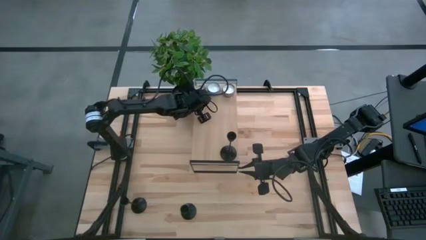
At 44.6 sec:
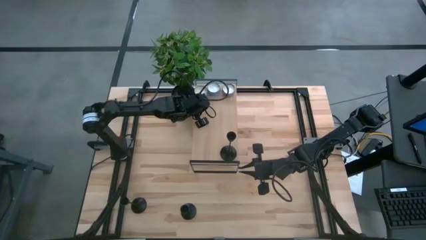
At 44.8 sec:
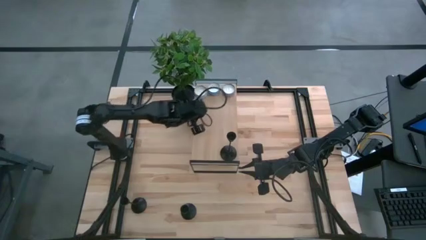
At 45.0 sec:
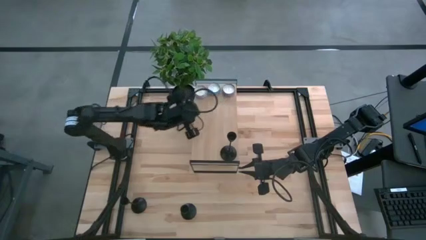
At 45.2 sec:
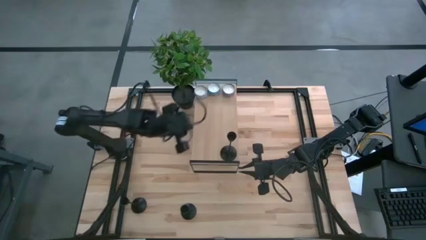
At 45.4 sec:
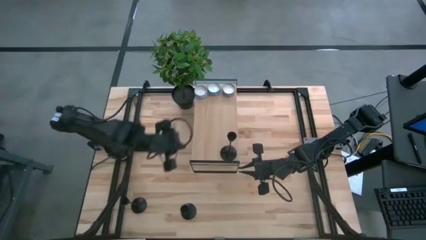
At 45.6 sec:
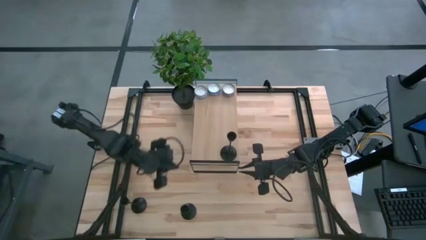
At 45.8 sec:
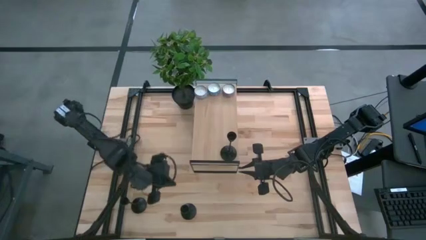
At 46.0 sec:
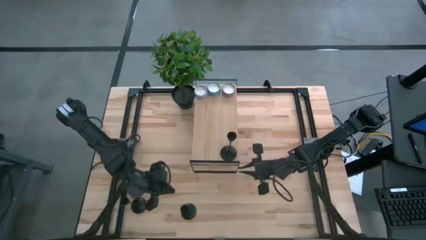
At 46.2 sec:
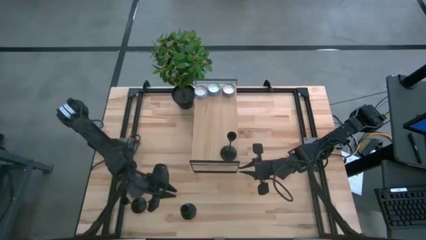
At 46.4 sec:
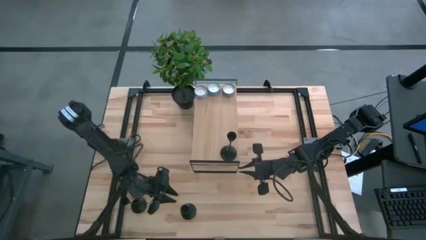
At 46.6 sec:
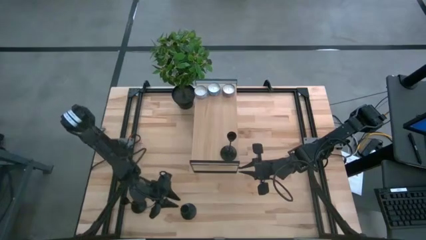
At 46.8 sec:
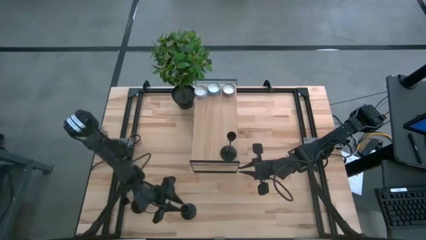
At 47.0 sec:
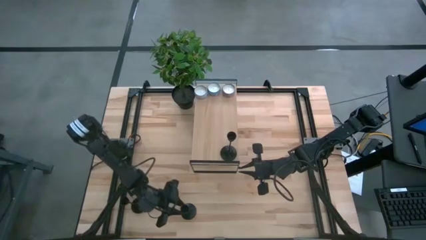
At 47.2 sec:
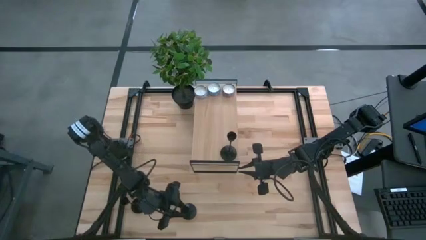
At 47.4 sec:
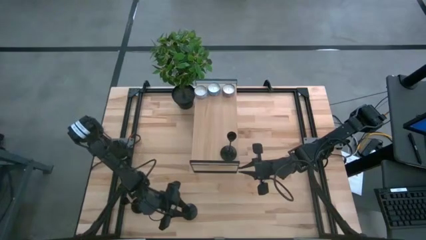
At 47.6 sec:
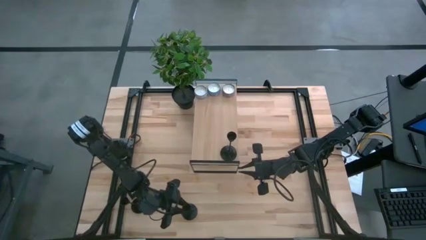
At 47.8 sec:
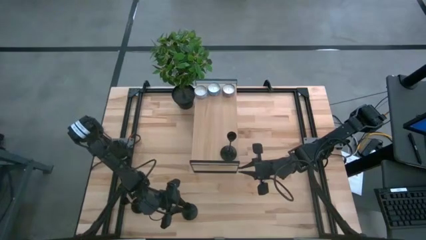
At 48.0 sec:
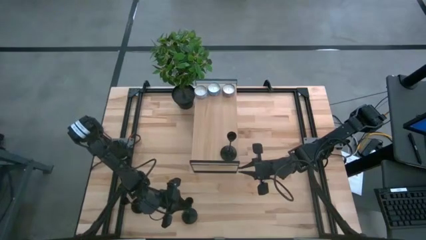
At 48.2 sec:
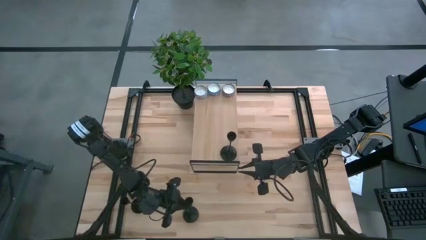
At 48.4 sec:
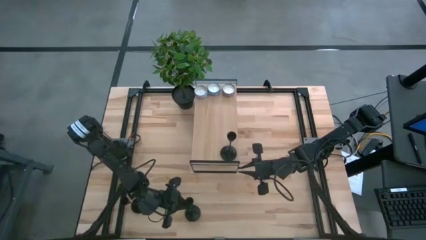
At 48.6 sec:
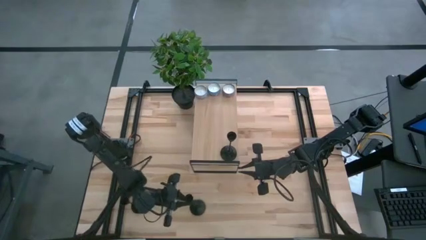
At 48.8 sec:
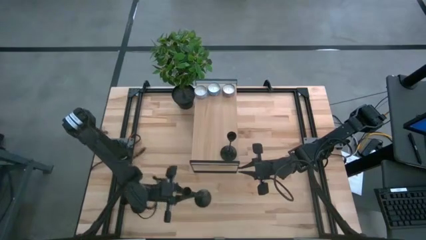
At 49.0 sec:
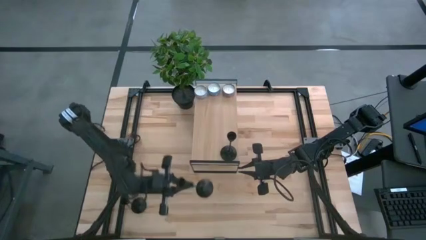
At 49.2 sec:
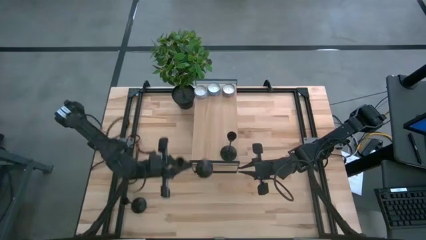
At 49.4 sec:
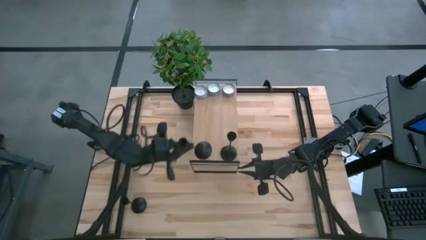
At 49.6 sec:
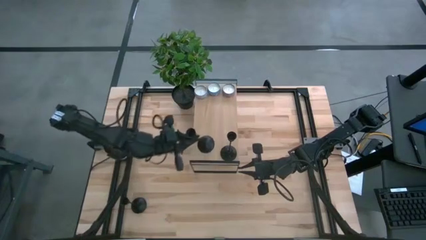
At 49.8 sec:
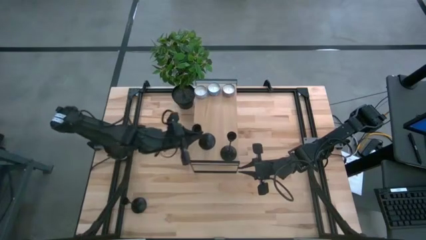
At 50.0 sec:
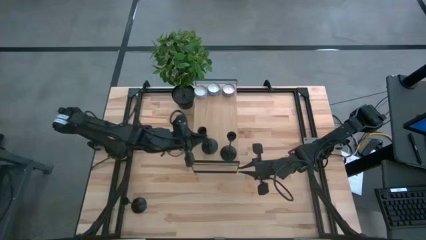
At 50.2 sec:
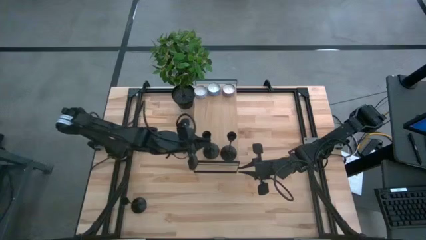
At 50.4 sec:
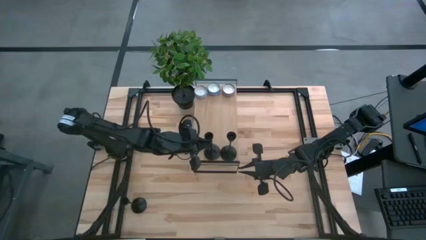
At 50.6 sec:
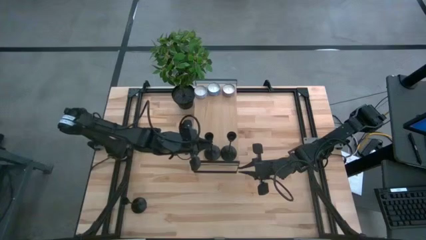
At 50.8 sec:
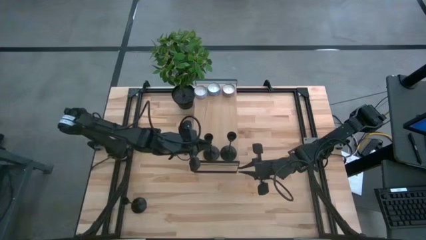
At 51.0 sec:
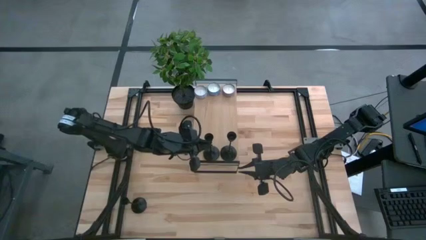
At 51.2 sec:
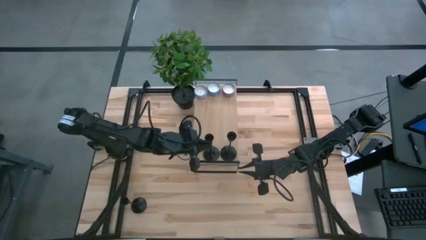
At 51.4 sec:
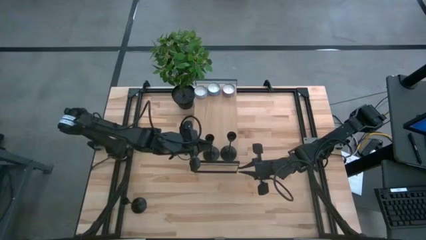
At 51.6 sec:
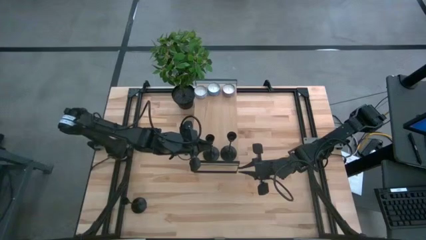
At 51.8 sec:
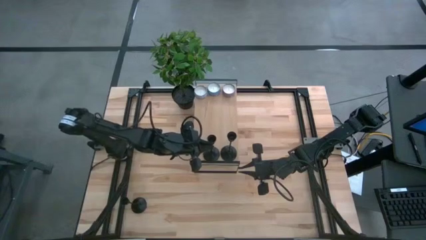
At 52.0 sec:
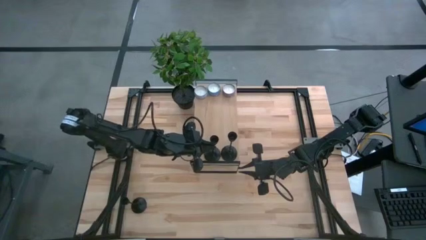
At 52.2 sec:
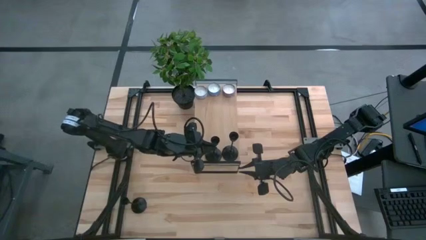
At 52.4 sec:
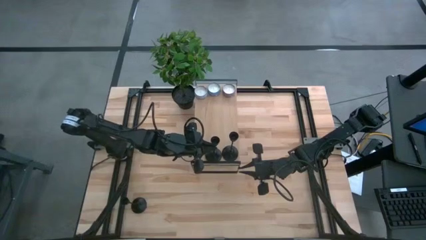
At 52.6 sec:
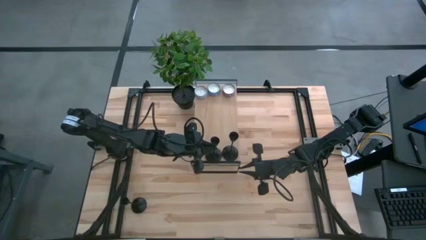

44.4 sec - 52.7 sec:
Task: Pick & Place candle stick holders
Put the bottom black candle holder on the shelf

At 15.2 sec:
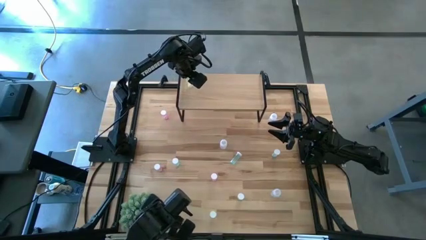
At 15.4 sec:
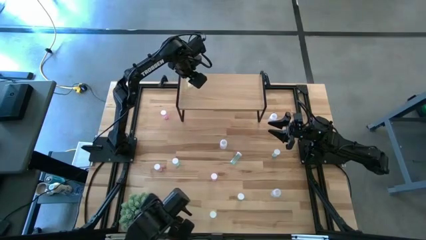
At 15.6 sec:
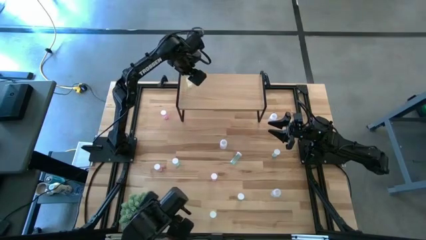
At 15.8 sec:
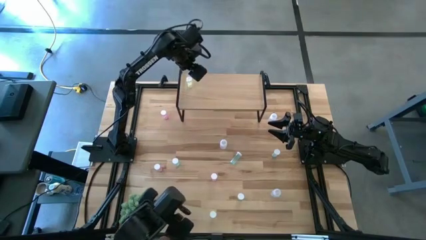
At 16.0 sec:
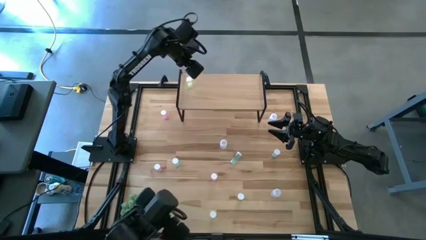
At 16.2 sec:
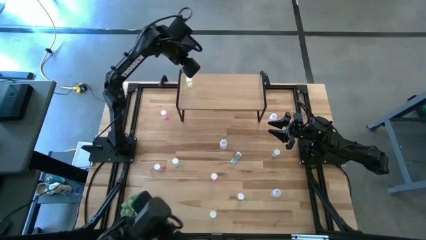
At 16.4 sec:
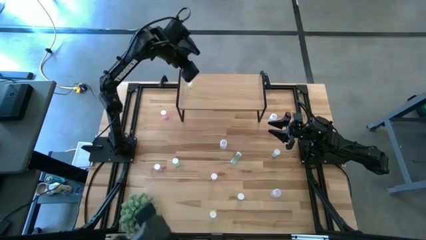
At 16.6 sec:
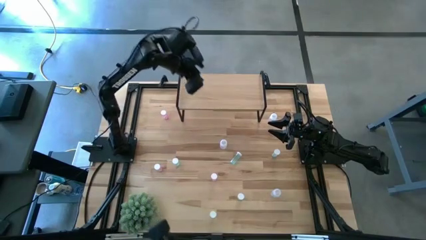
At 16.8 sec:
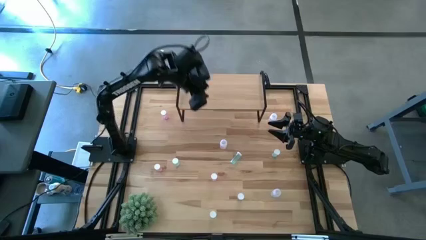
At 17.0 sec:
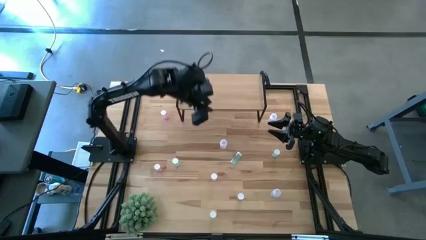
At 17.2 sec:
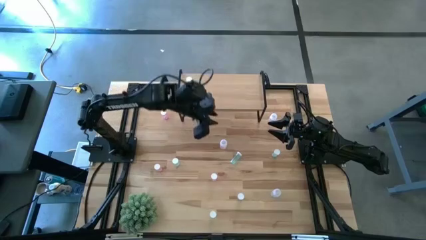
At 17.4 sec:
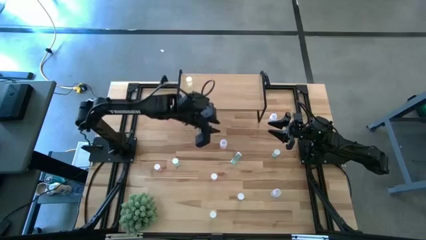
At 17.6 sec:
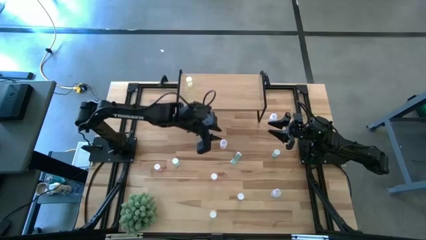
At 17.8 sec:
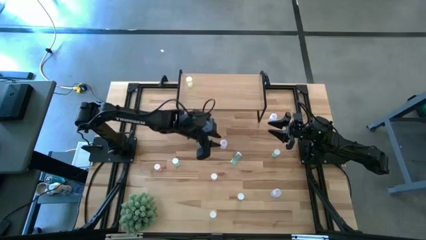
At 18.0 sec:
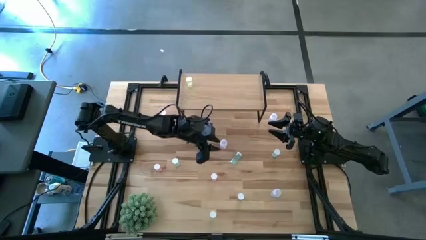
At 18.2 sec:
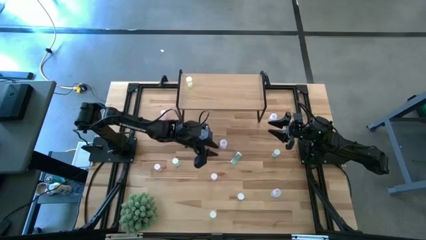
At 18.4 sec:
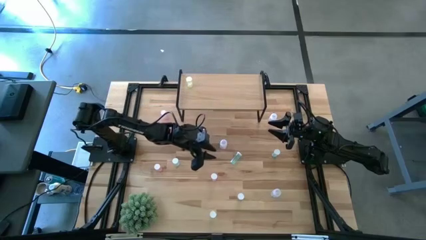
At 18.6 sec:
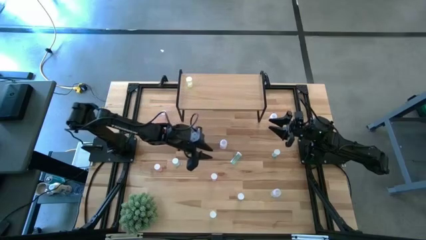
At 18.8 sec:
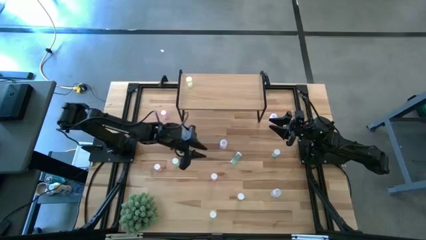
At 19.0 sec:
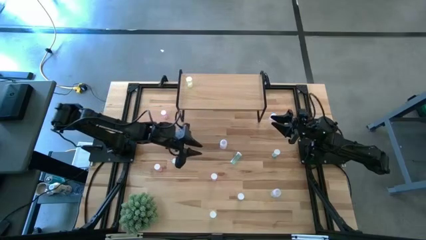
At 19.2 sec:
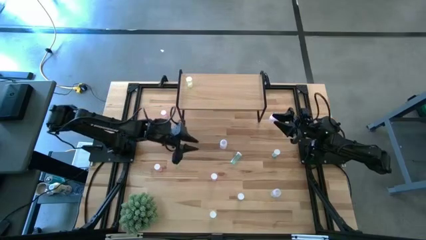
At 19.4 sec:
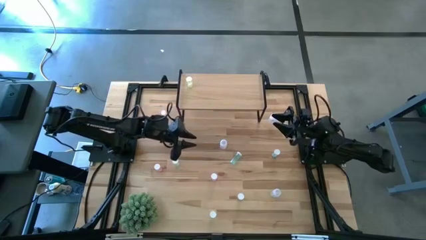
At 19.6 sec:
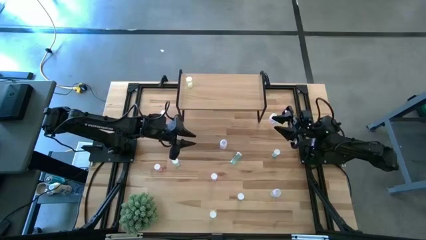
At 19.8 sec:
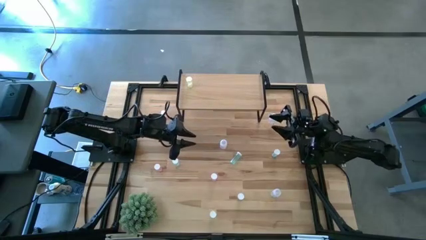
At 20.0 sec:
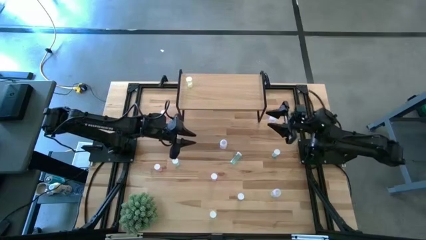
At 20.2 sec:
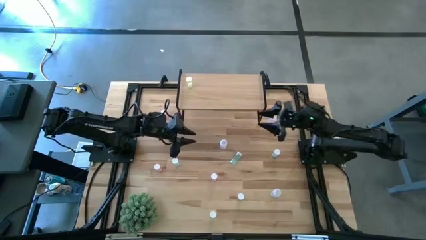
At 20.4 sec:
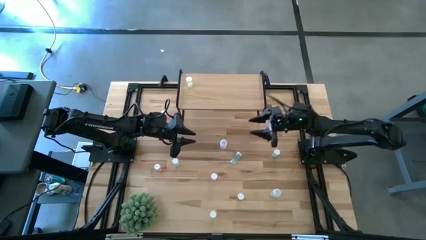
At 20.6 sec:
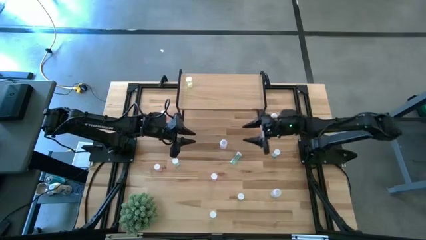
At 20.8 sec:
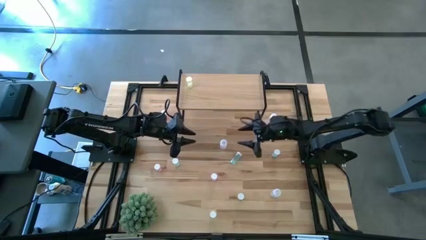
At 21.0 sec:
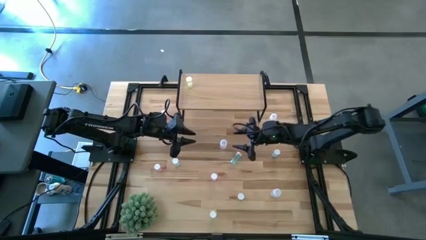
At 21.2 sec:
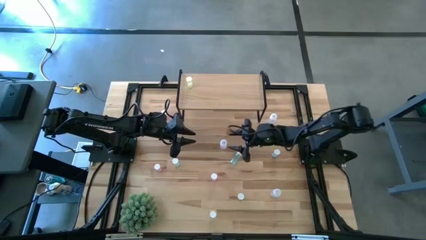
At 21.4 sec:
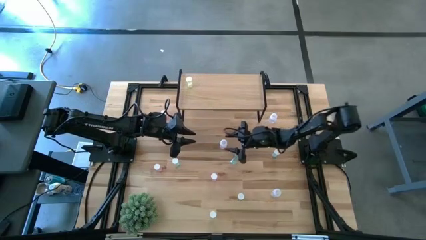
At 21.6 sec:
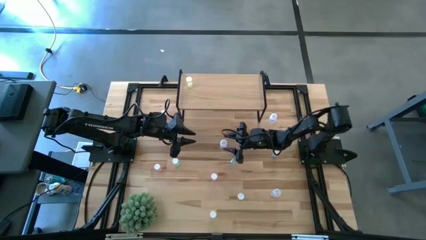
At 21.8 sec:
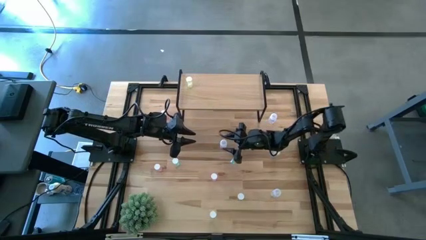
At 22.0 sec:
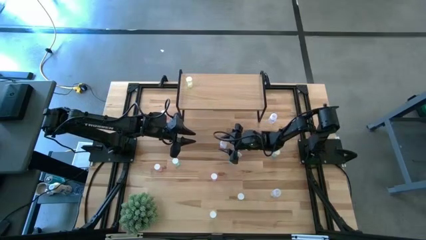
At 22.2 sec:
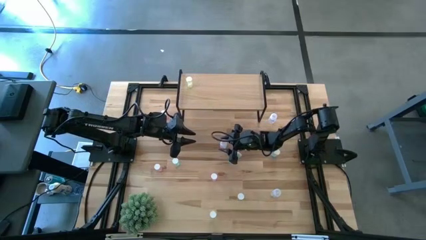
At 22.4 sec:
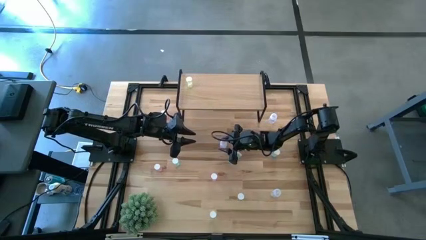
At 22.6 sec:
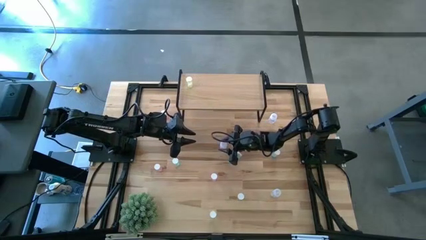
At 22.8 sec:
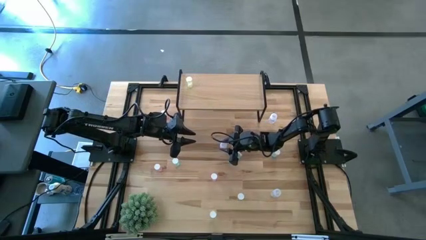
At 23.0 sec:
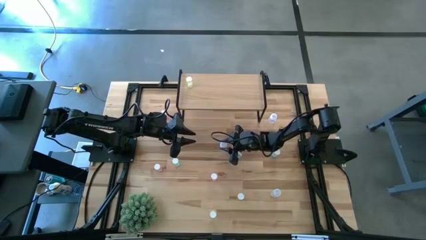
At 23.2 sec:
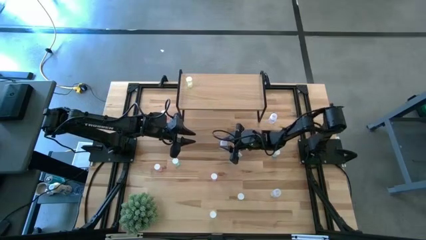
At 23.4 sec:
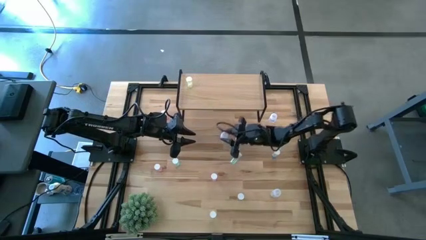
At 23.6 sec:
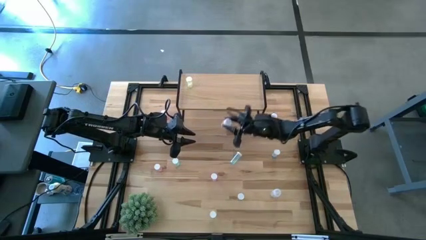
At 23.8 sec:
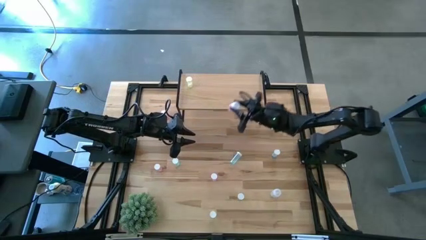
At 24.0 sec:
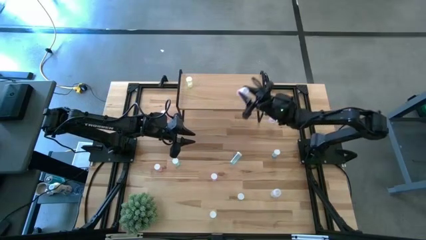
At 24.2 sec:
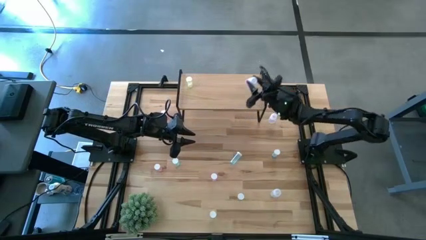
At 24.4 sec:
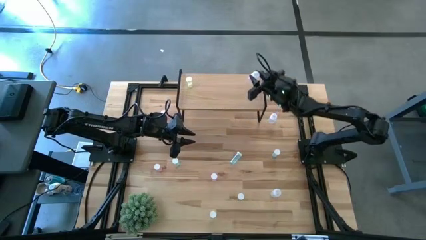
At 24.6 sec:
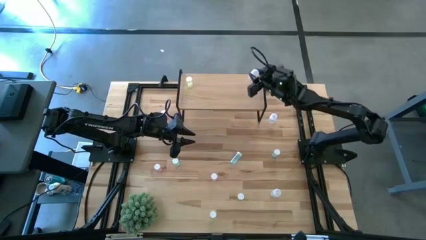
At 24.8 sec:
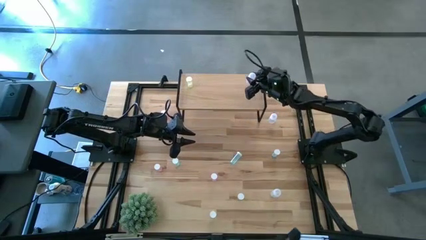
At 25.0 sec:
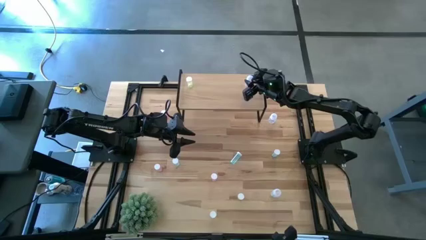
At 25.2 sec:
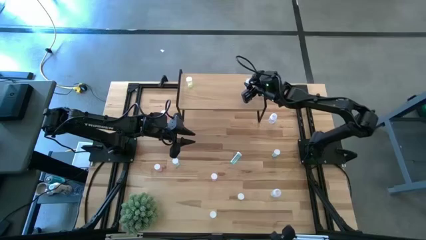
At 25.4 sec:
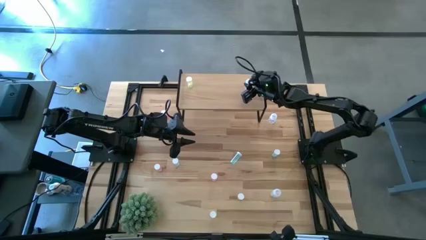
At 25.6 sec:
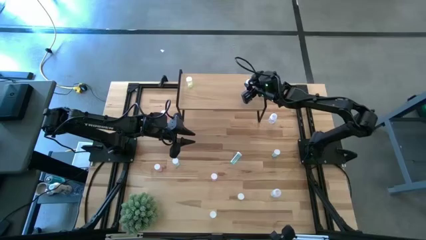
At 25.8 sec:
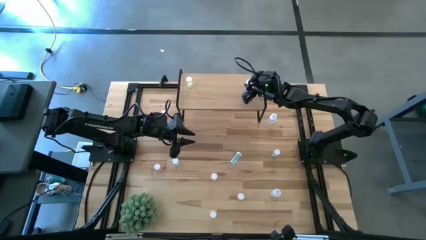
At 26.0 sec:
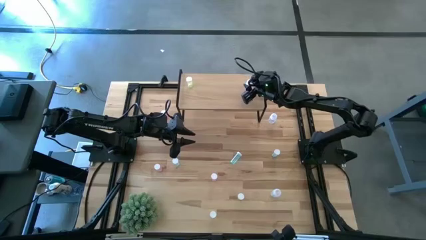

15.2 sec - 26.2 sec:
Task: Pick and place medicine bottles onto shelf by color
Put the left transparent pill bottle on the shelf
